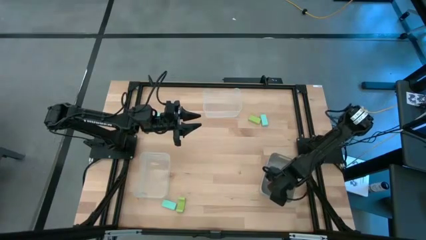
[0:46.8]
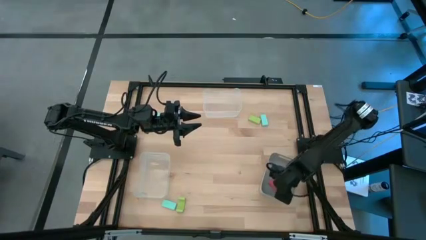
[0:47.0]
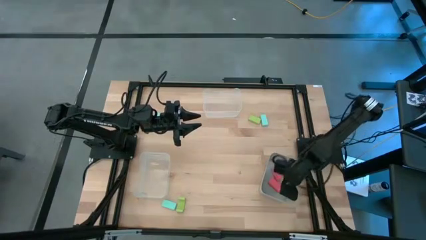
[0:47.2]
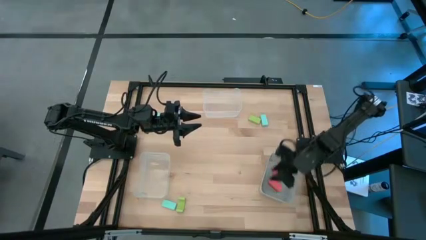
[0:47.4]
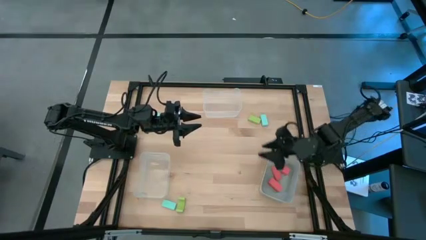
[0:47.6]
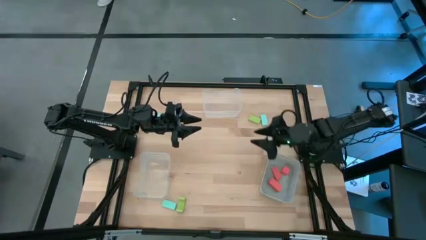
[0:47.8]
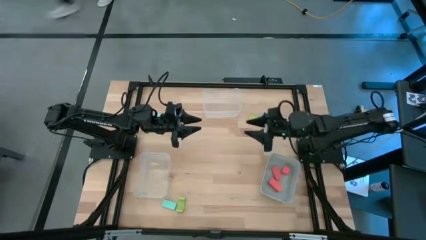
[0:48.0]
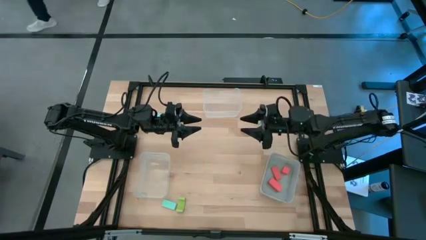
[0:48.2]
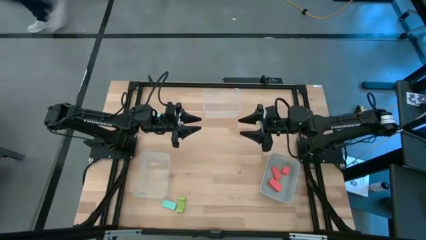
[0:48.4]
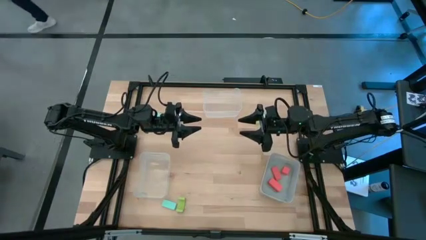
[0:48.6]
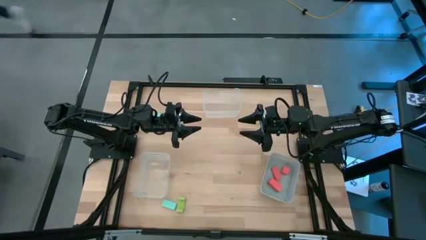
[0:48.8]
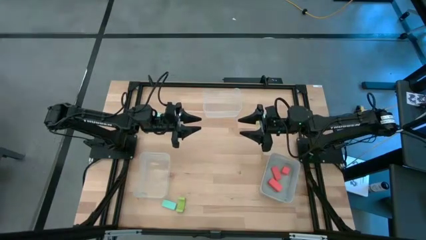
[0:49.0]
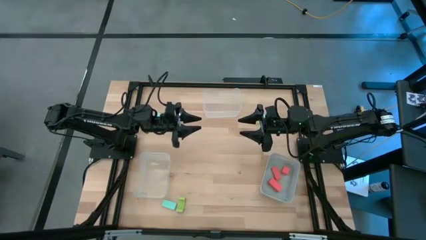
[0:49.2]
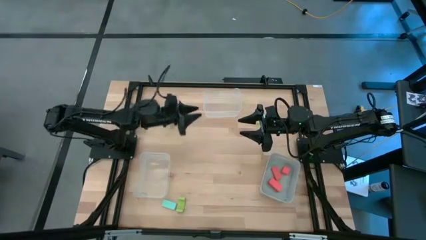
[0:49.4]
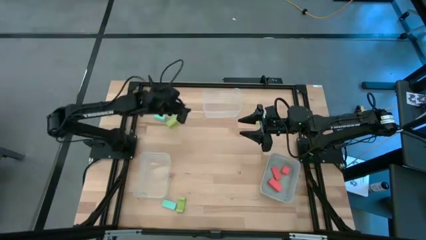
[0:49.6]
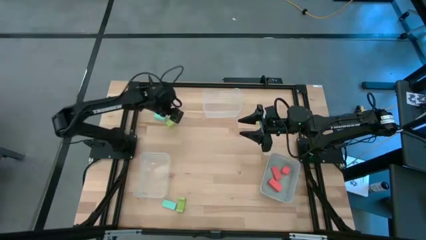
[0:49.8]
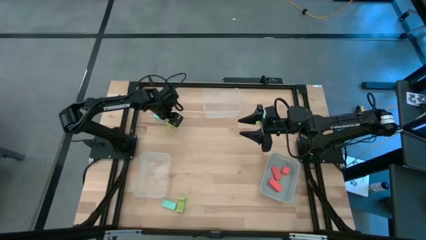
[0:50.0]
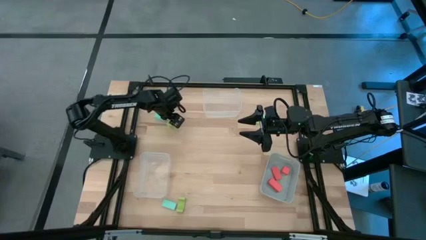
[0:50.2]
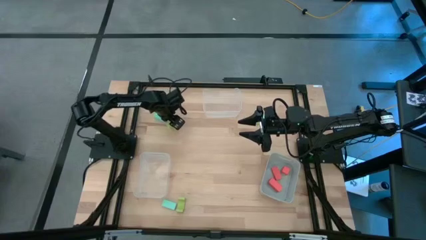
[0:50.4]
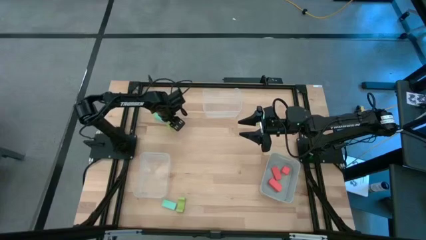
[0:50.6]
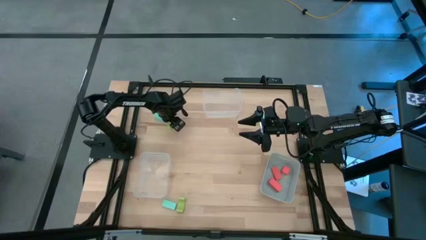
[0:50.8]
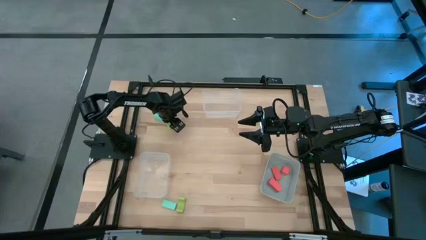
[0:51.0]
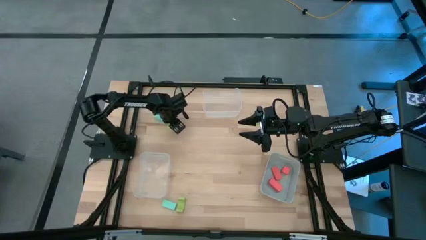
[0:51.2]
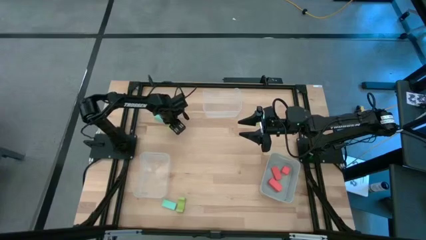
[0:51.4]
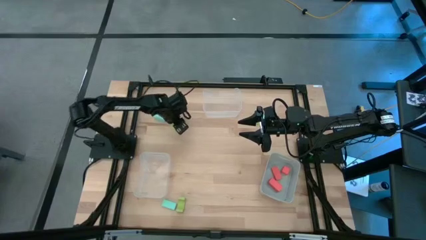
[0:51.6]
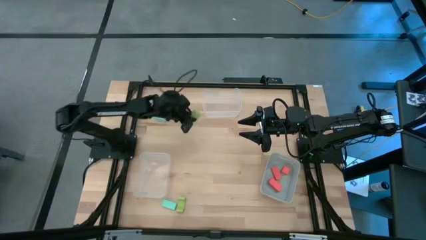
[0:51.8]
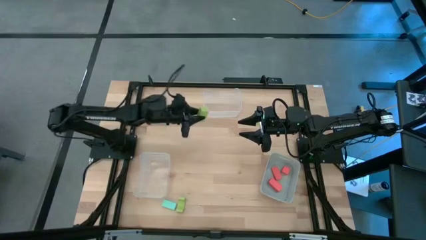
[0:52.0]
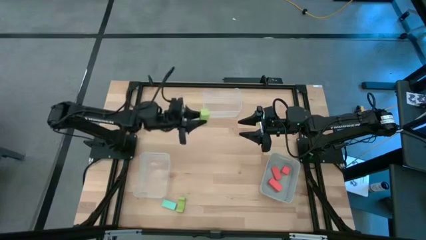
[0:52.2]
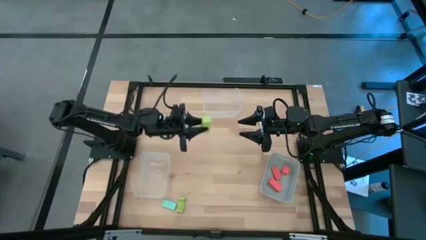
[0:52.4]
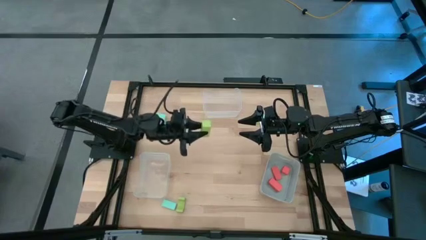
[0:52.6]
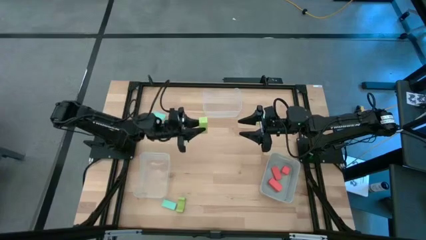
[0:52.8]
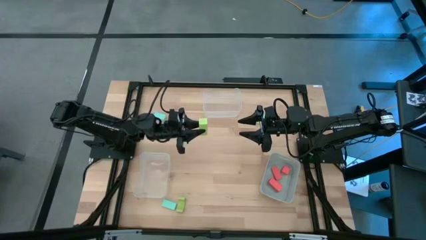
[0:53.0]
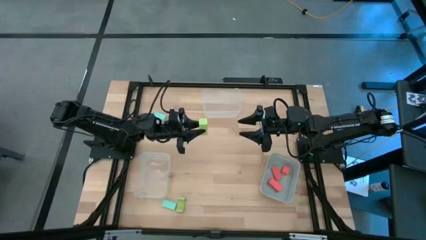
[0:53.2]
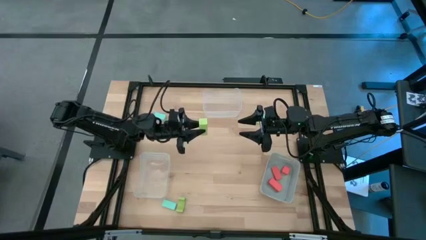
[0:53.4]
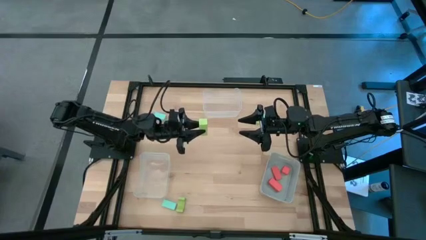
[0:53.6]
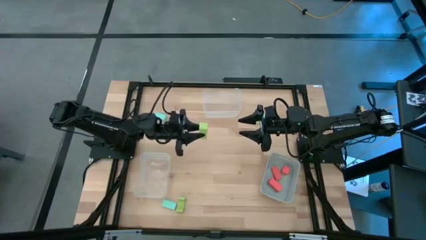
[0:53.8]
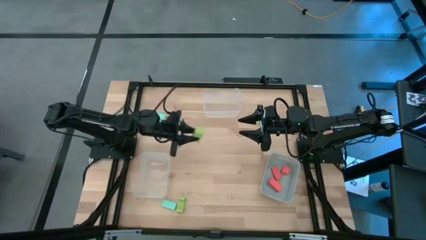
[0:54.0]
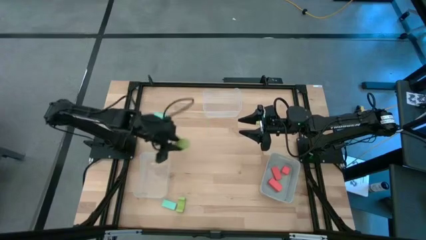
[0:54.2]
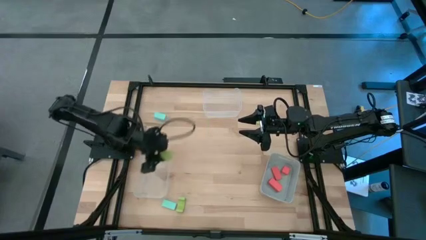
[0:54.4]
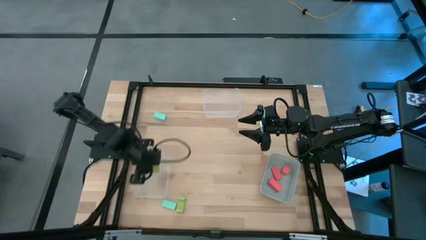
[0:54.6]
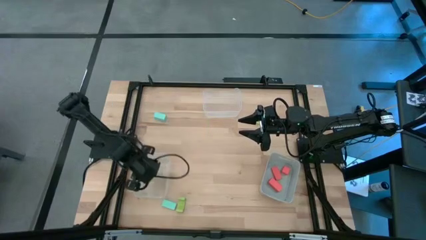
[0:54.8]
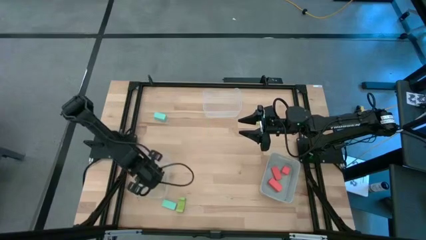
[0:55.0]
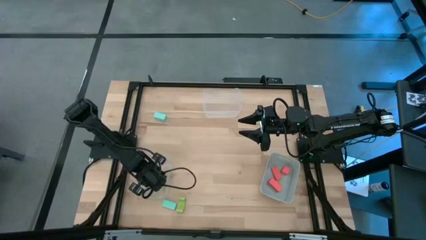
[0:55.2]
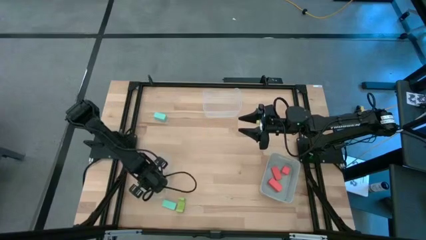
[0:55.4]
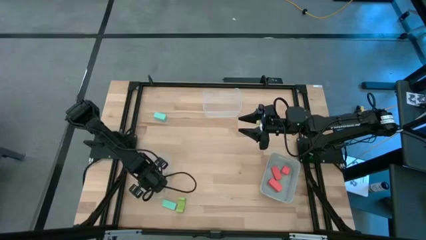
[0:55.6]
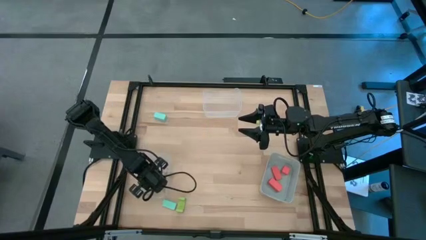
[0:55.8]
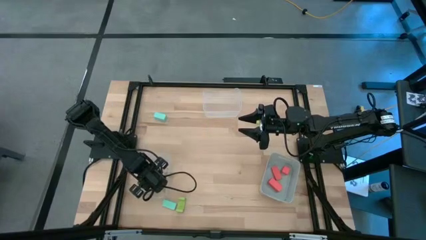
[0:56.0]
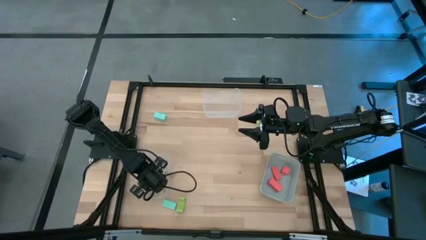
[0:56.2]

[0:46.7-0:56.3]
Task: Sort & place blocks by color
Put the top left green block into the bottom transparent bin
